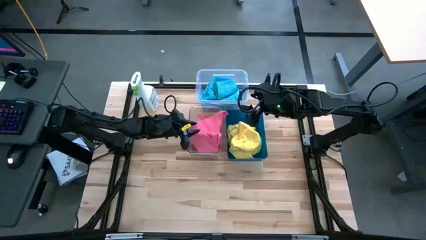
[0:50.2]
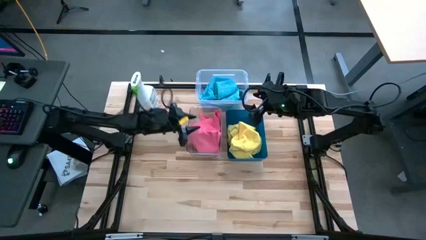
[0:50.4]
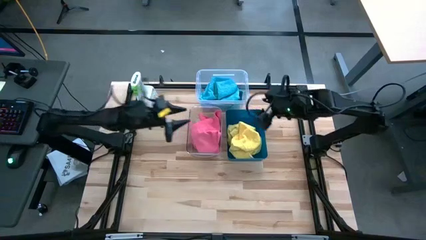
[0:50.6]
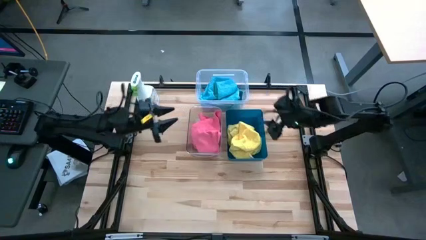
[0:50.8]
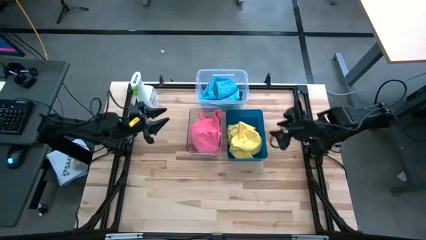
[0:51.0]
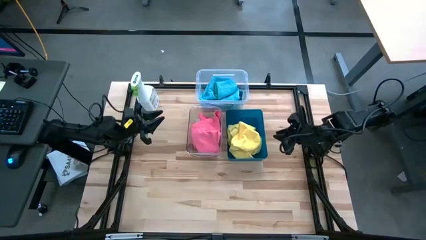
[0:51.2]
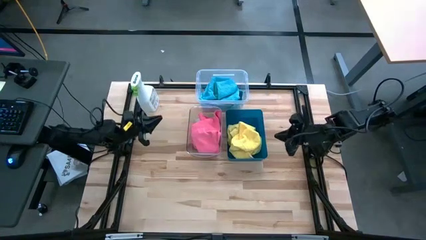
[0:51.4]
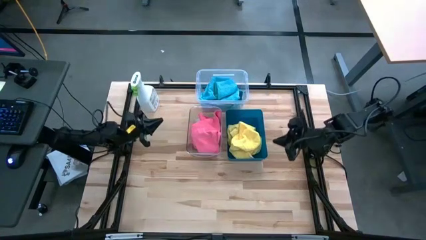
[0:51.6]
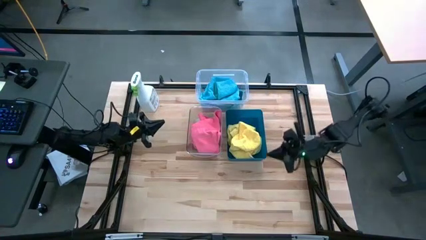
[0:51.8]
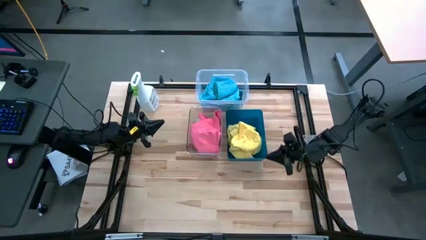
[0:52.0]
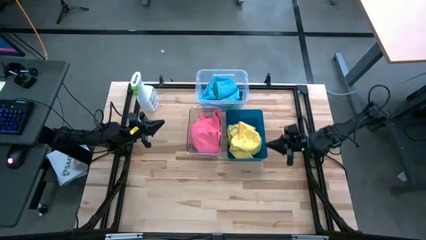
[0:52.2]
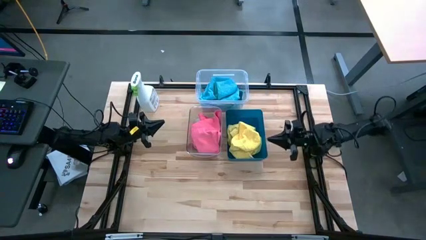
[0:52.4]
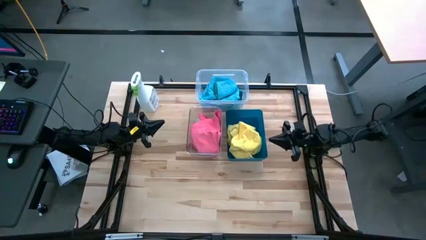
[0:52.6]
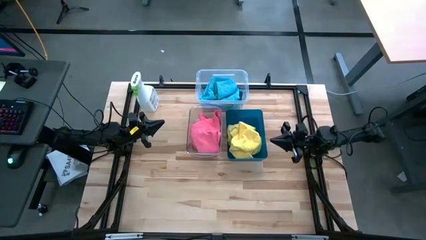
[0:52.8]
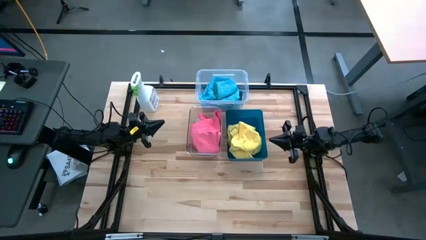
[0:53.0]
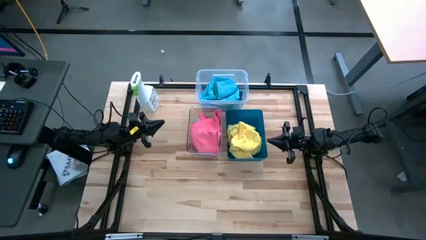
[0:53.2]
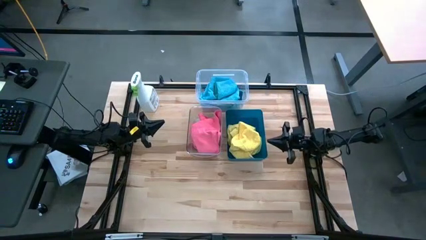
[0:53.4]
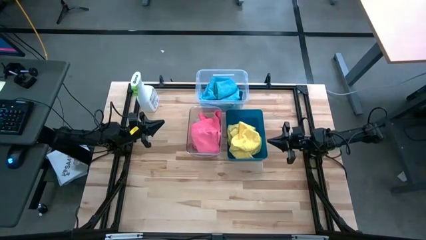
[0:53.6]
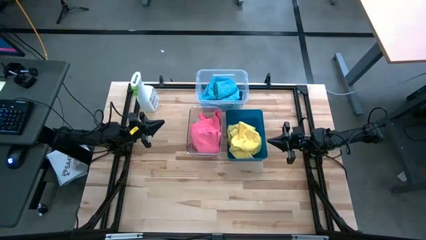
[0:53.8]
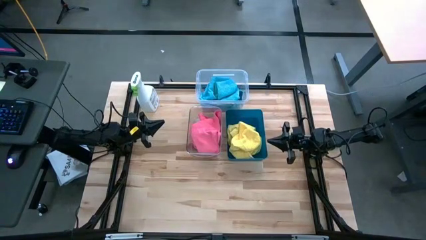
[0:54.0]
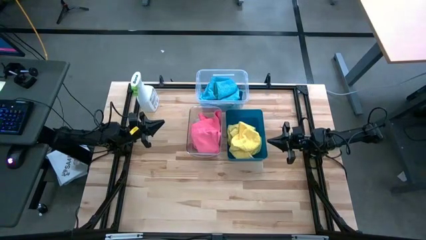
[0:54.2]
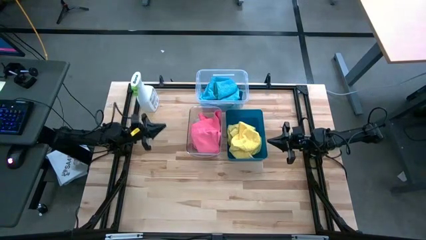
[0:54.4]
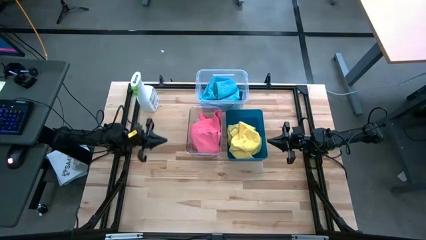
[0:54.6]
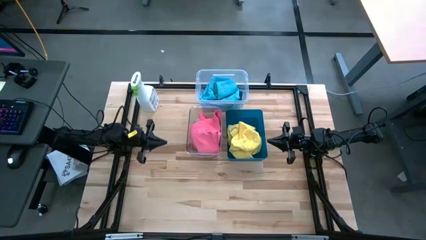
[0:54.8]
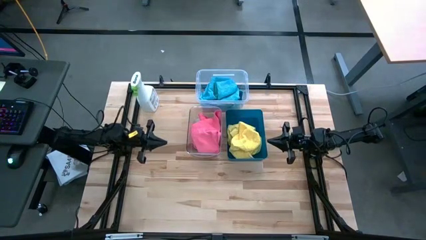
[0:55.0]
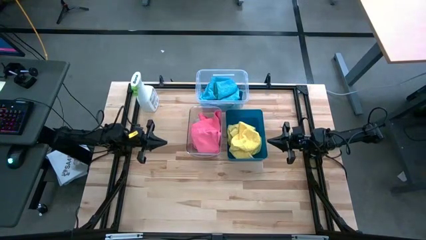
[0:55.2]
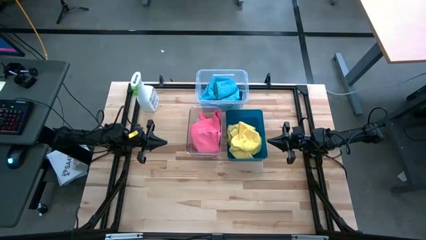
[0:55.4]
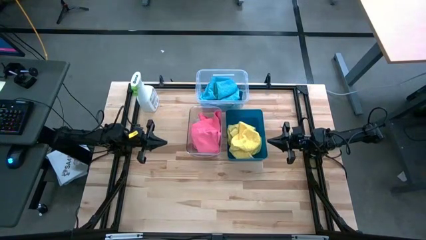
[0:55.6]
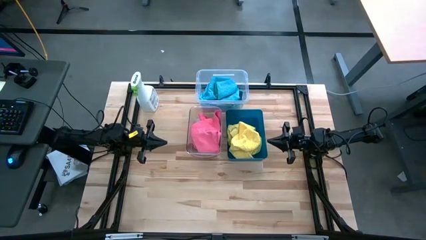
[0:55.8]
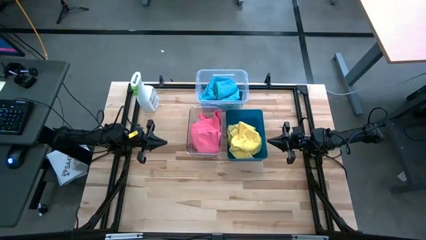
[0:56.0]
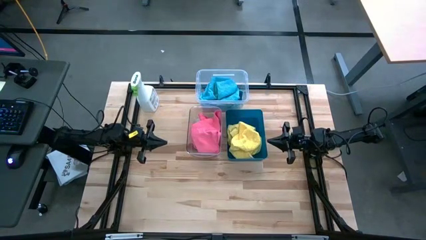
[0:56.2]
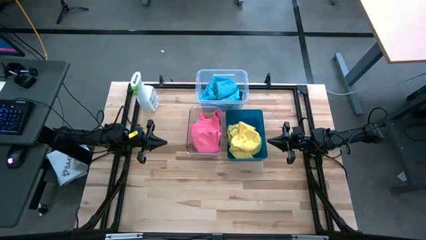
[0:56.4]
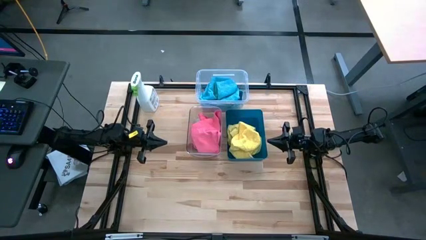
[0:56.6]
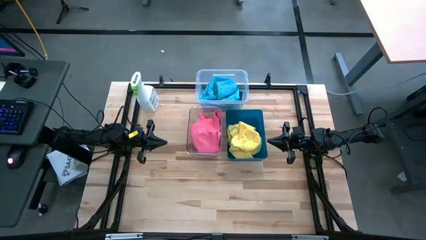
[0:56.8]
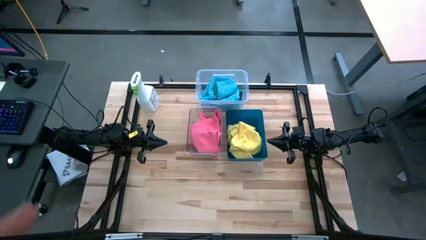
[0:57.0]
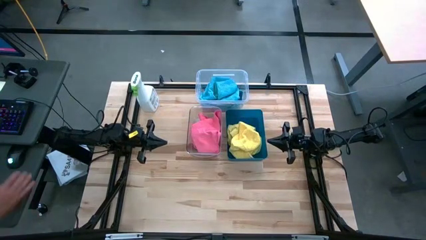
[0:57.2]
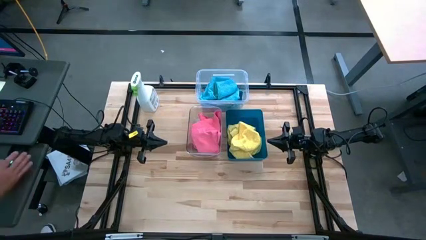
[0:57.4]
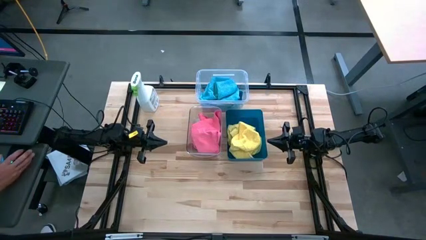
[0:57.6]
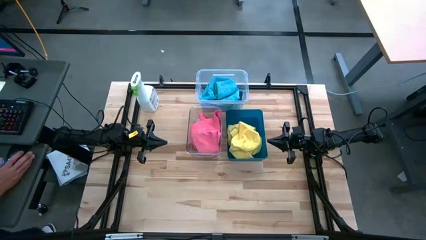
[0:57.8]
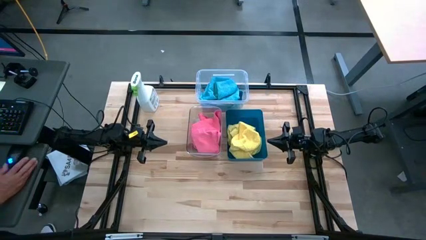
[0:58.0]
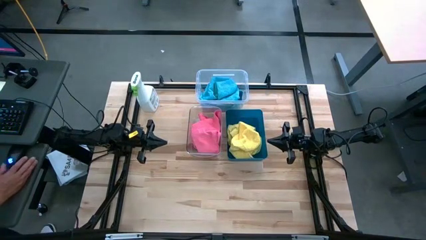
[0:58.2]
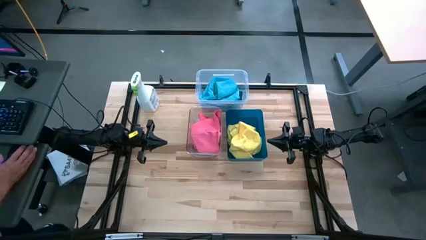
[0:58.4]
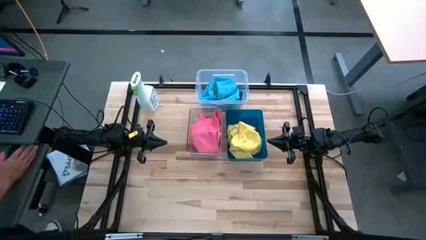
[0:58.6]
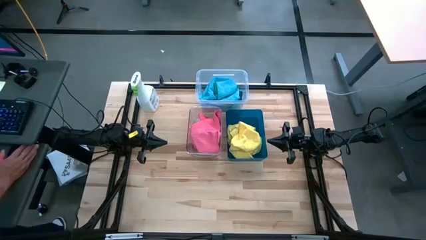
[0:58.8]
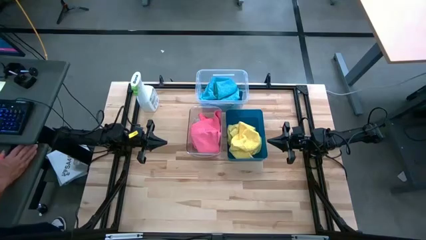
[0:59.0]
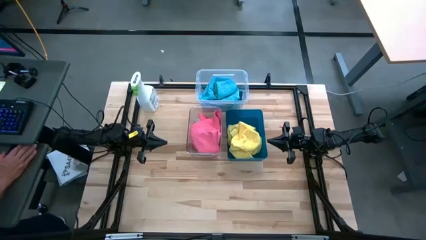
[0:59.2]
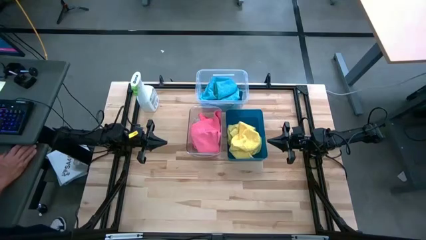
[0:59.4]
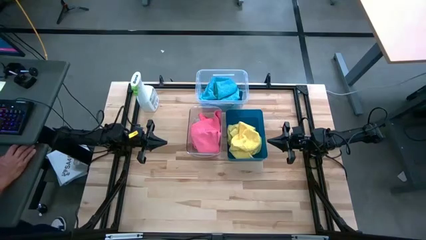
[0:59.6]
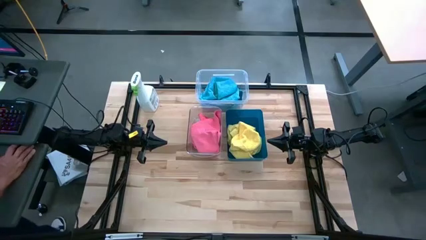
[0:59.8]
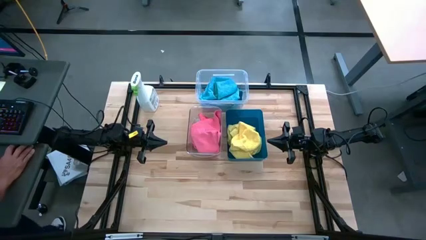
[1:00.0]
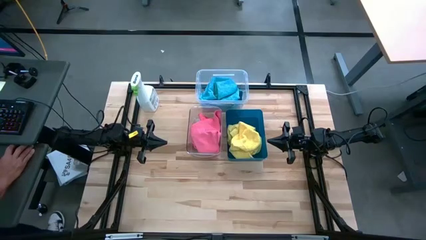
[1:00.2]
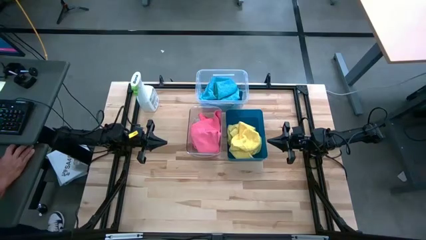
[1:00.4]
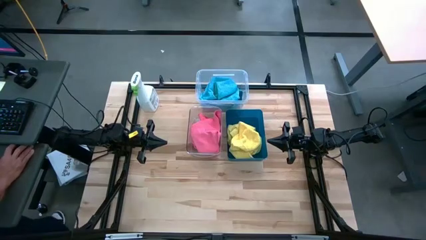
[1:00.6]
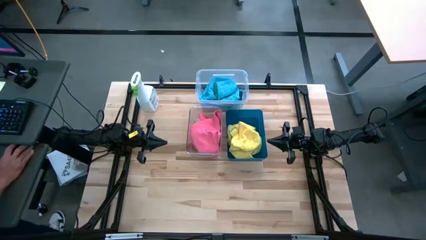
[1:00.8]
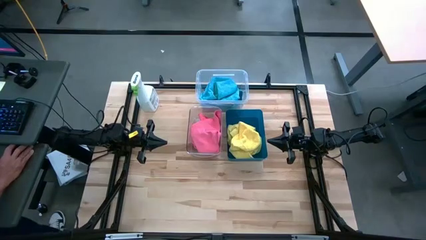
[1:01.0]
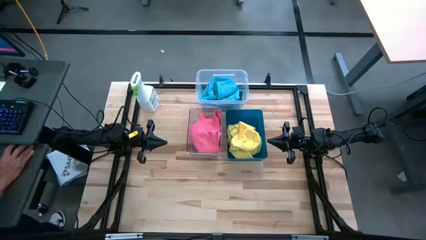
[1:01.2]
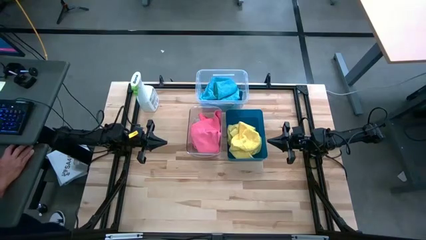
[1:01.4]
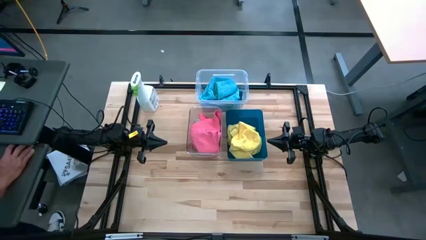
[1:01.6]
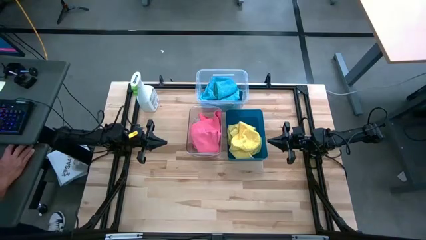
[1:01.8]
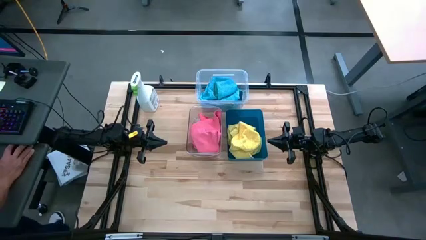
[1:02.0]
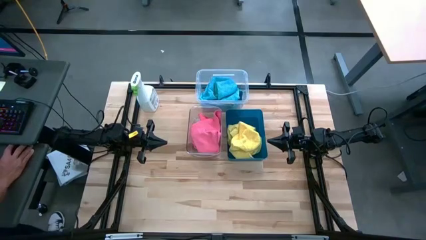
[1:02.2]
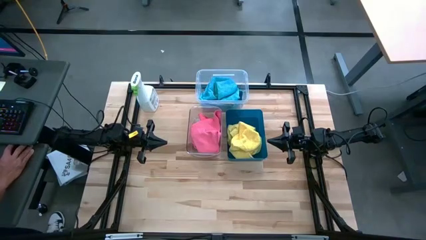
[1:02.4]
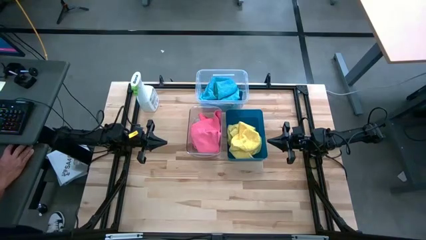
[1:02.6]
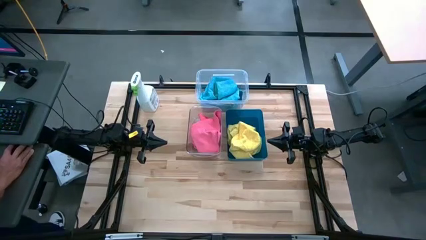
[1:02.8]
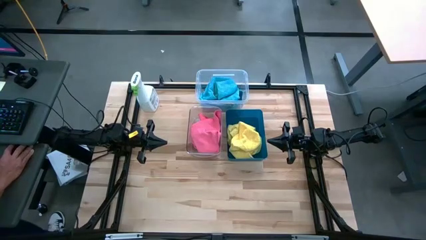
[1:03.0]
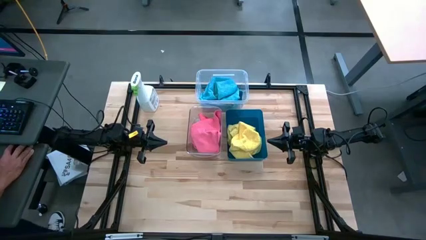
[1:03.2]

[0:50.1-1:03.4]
Task: Sort microfiber towel by color & place in baskets
Return to Home Position

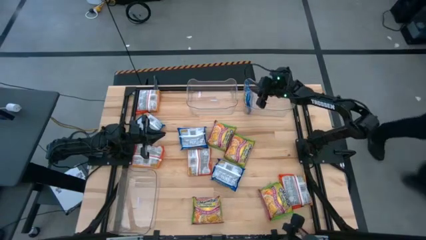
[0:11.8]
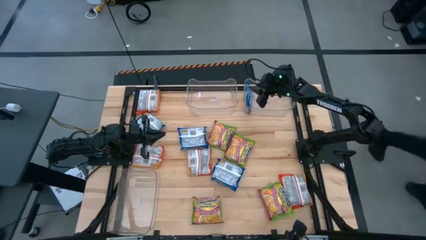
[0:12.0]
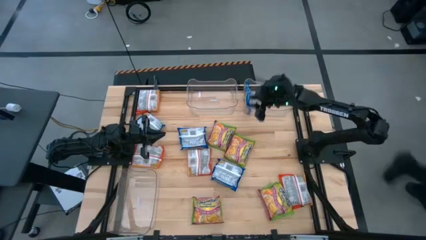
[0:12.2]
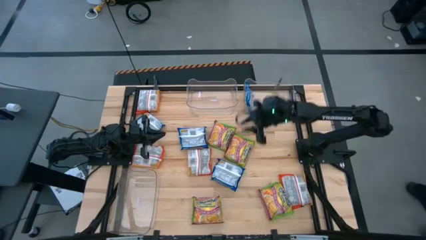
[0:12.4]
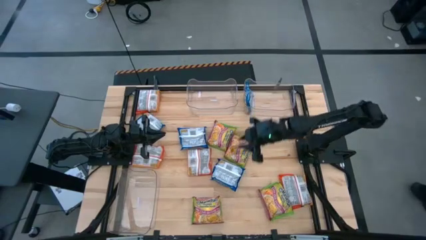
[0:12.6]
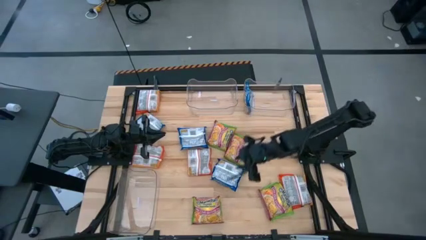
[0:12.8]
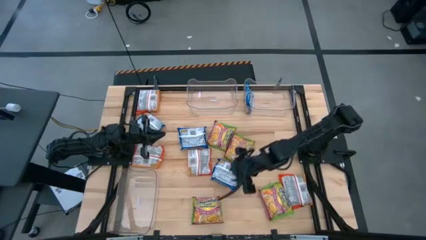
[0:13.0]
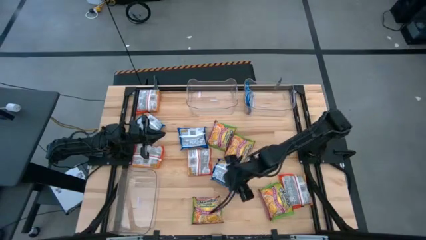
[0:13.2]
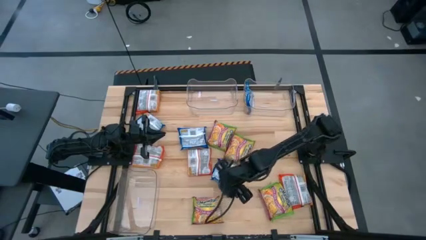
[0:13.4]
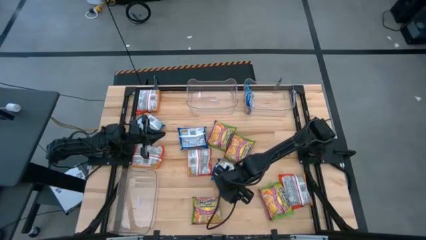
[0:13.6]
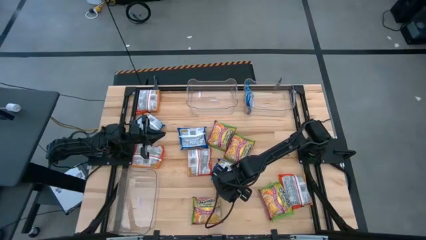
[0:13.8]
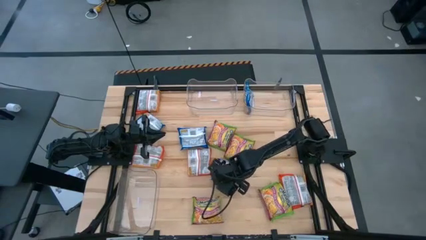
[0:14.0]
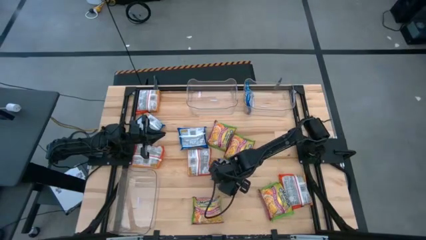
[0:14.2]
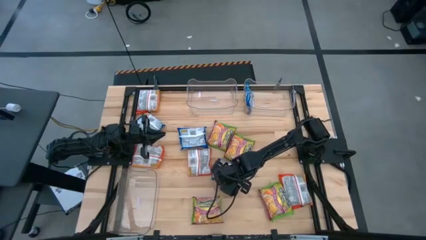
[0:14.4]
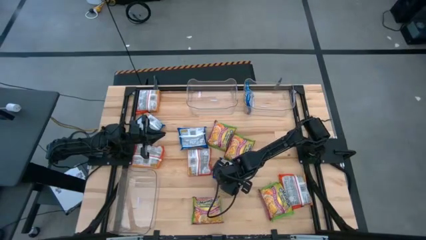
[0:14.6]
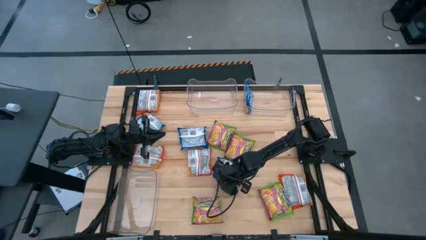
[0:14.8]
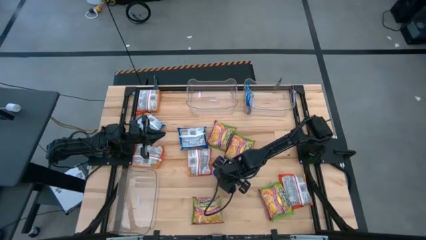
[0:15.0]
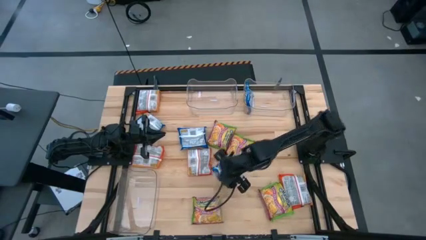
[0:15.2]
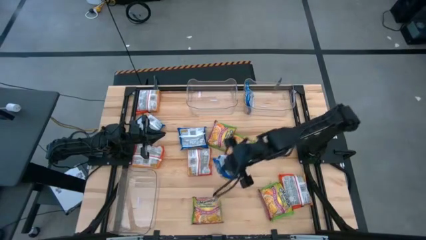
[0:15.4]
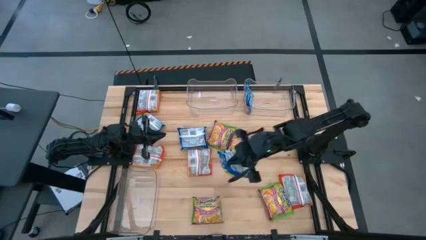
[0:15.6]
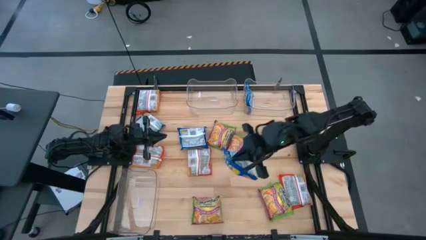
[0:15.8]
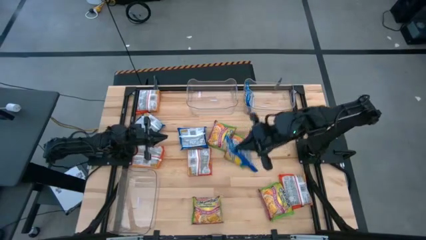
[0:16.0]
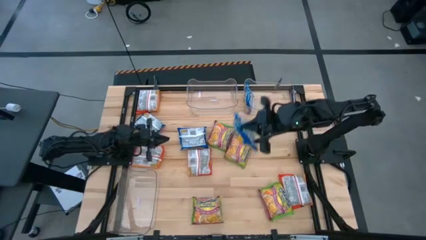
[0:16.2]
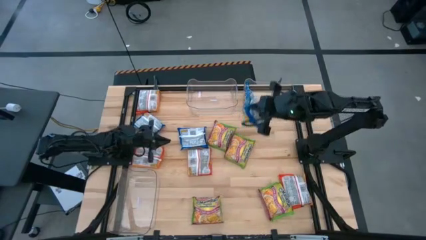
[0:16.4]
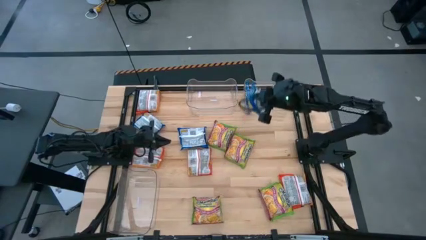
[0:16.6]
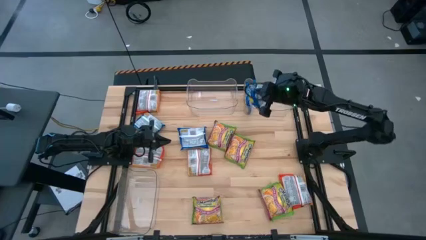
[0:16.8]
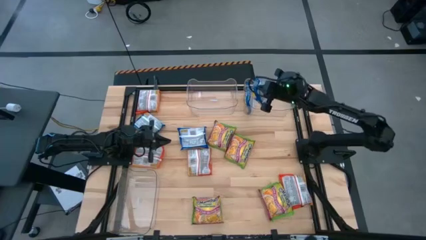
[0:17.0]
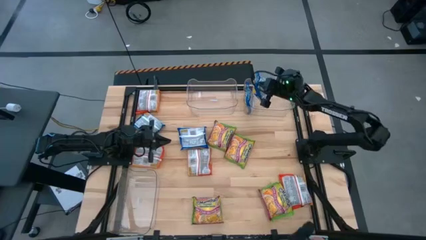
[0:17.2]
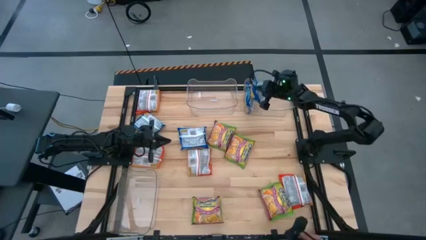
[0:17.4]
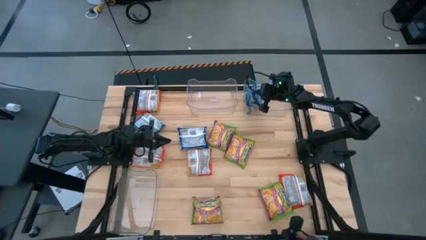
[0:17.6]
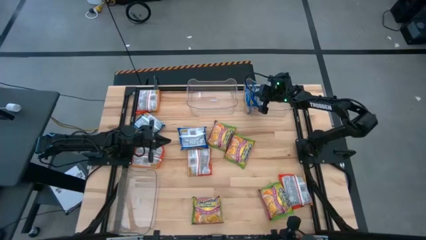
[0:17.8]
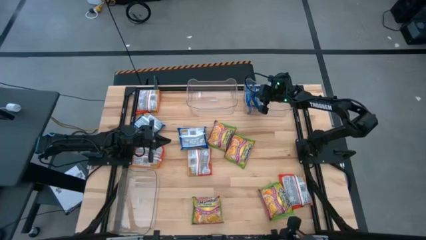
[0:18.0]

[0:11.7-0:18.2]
Task: Sort Maruchan noodles
Put the blue noodle pack into the top right transparent bin
